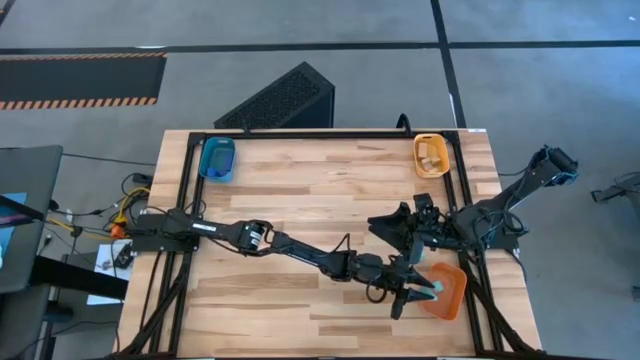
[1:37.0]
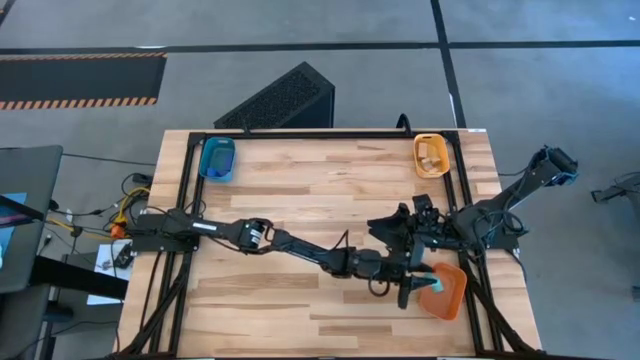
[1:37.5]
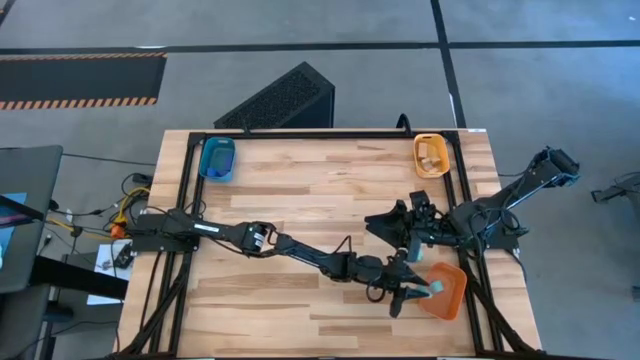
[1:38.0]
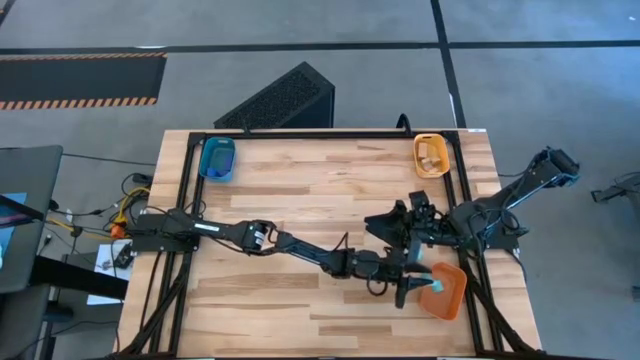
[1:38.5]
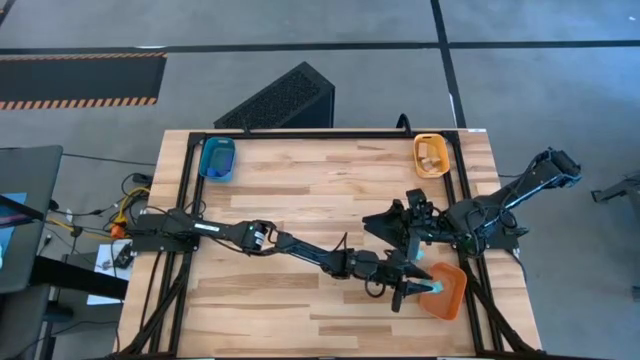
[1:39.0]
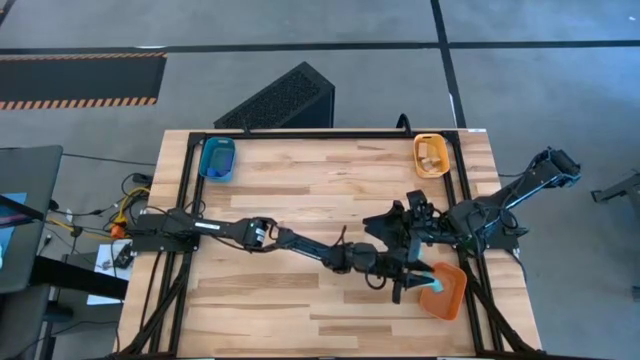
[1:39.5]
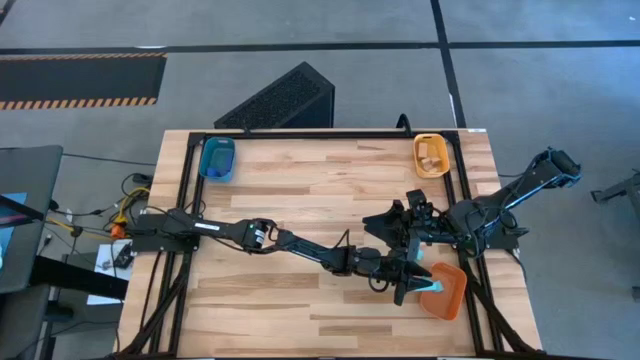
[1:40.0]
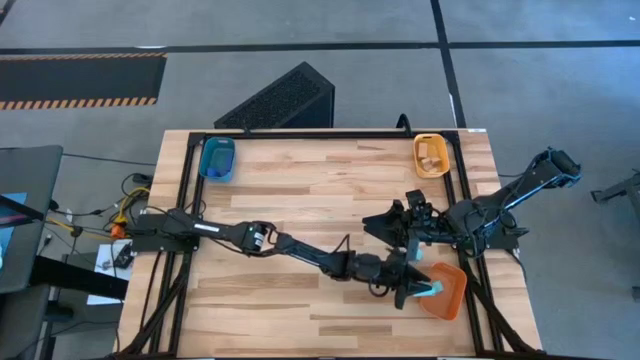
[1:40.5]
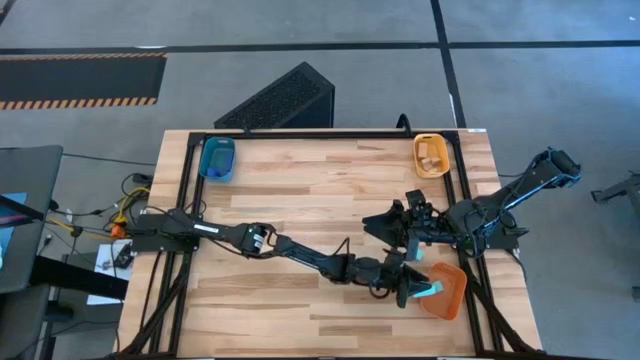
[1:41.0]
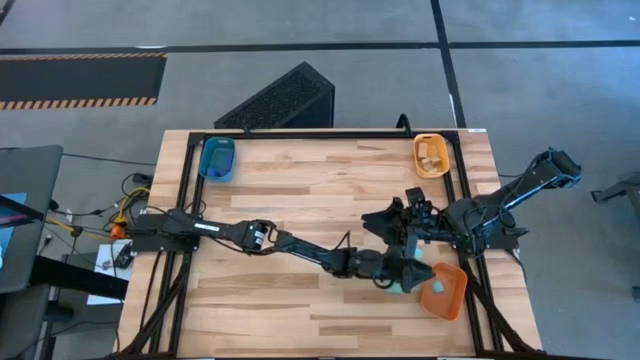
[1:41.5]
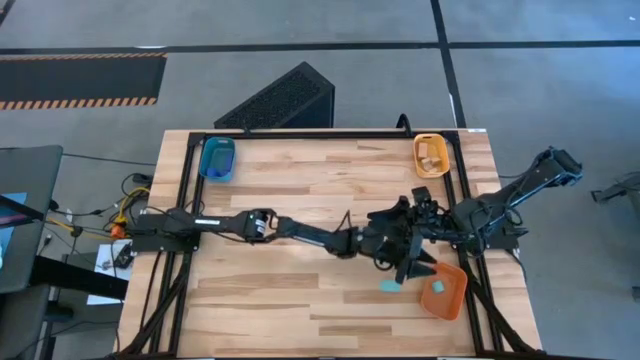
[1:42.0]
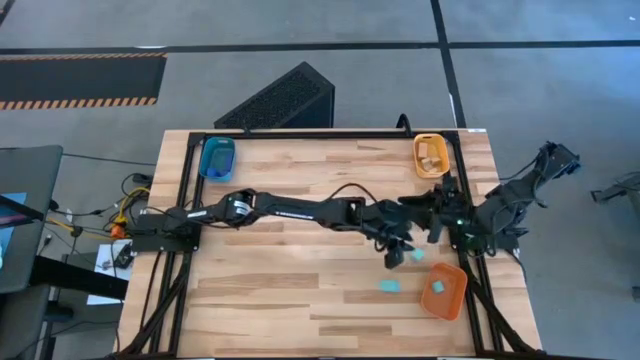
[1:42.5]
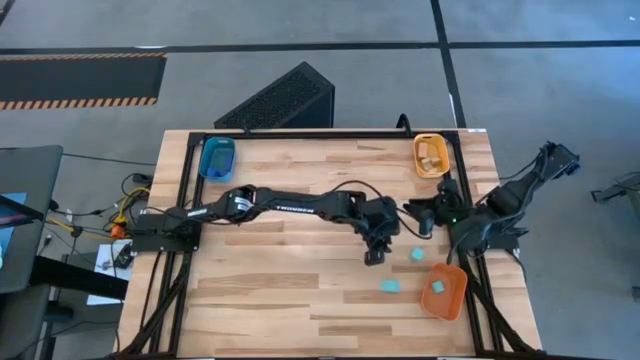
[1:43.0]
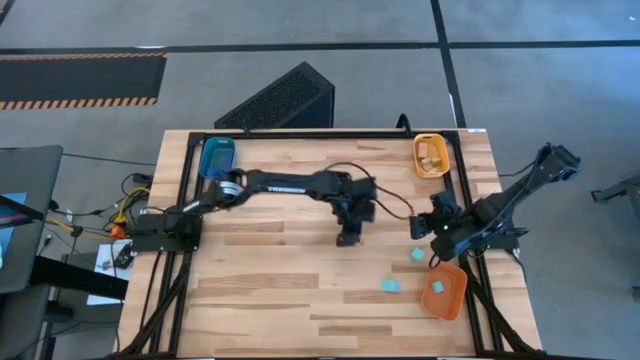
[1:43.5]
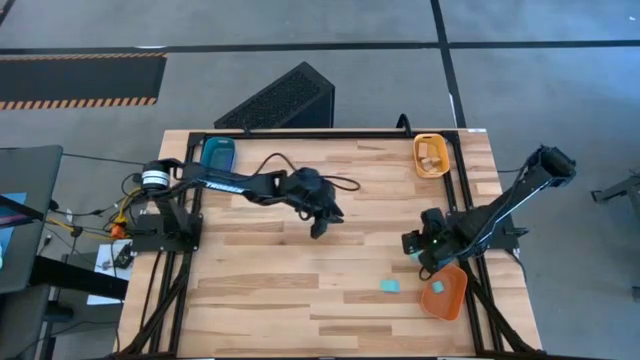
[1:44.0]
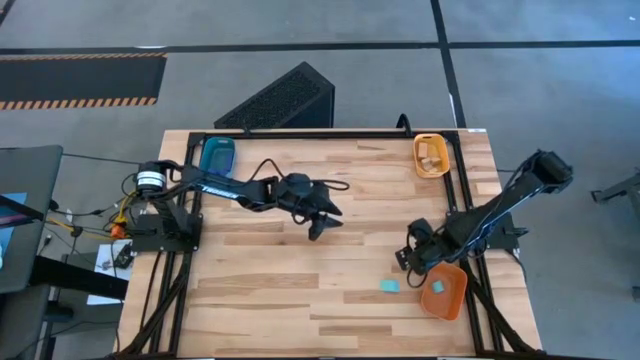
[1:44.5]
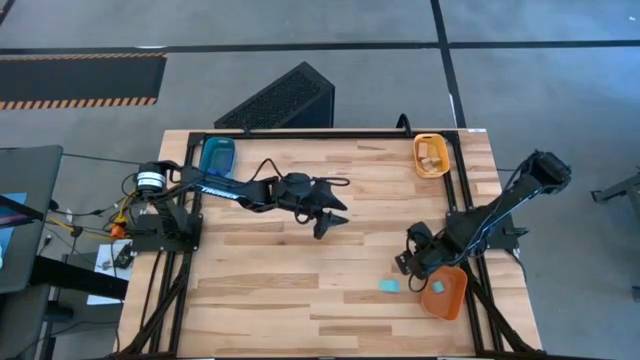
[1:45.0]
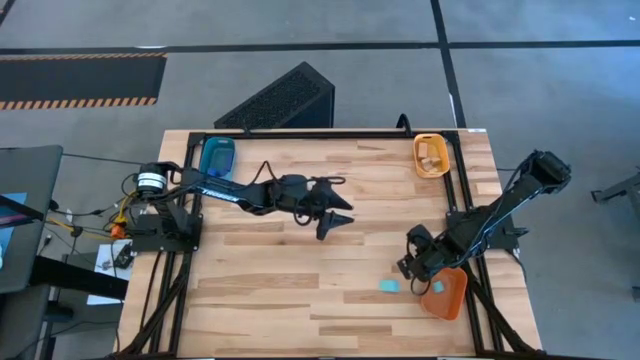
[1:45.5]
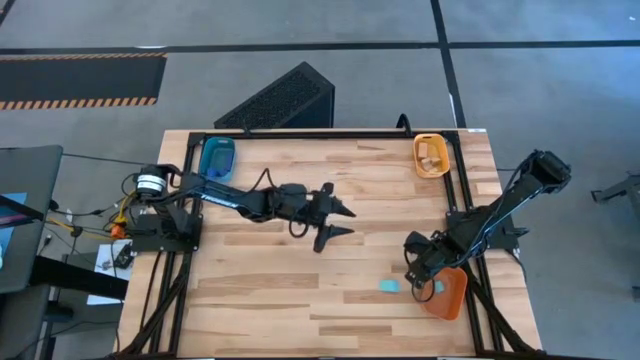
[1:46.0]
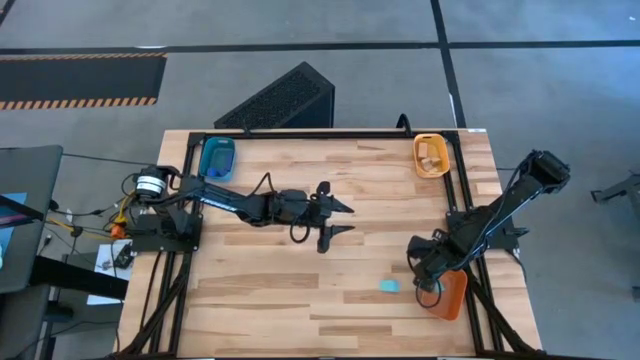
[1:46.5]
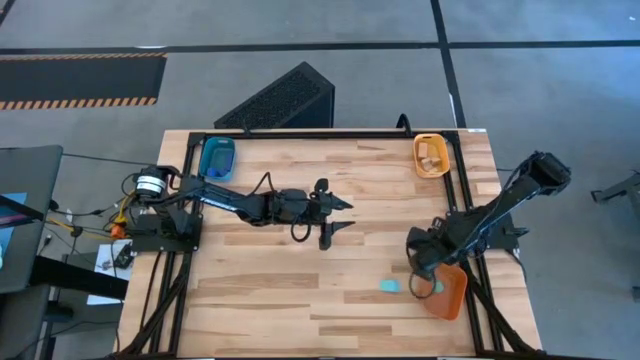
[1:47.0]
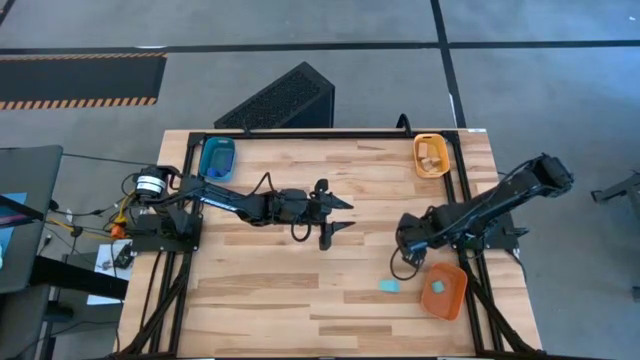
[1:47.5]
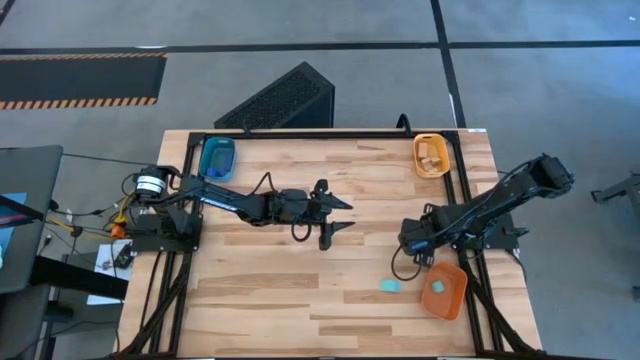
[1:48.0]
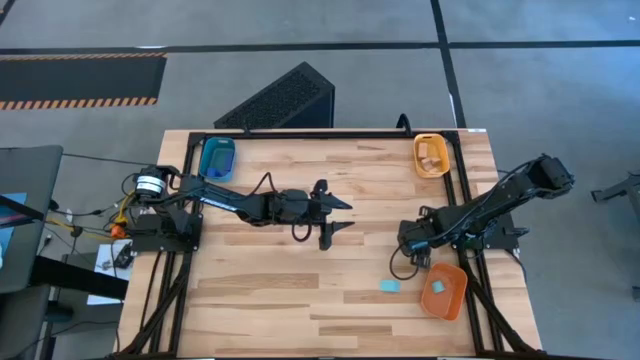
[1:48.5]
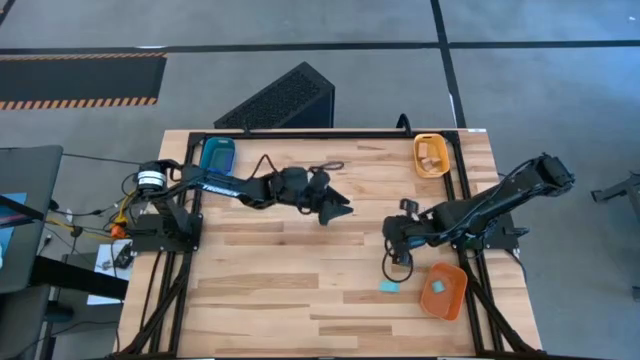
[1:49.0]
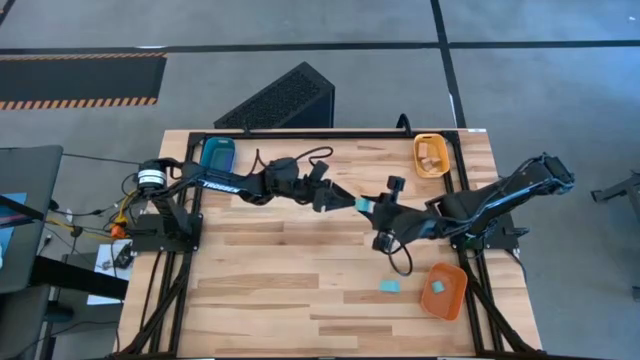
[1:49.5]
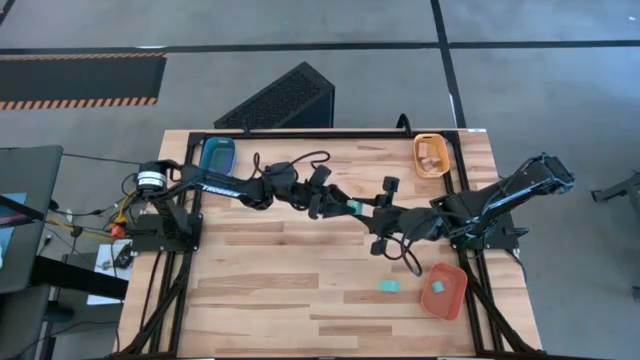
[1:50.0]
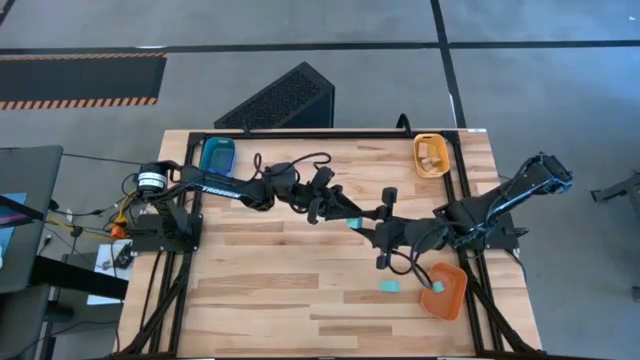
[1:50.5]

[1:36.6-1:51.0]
Task: Sort & place blocks by color
Put the top light blue block into the orange bin

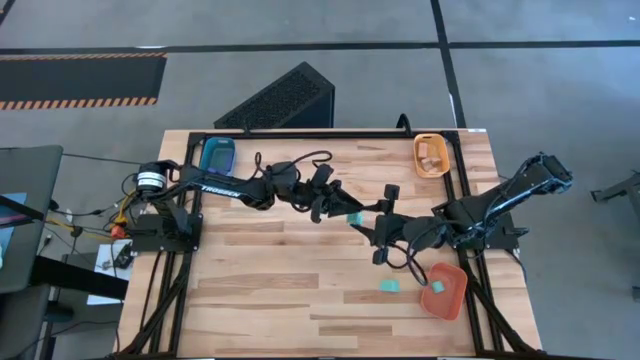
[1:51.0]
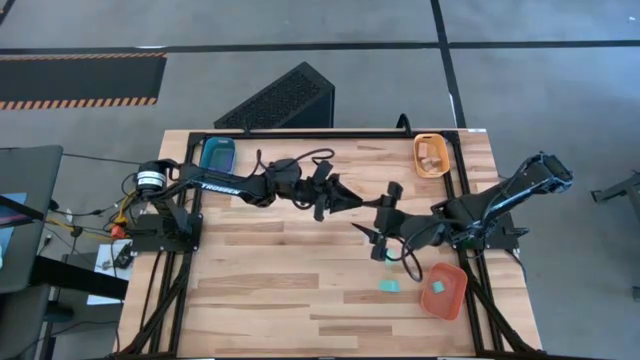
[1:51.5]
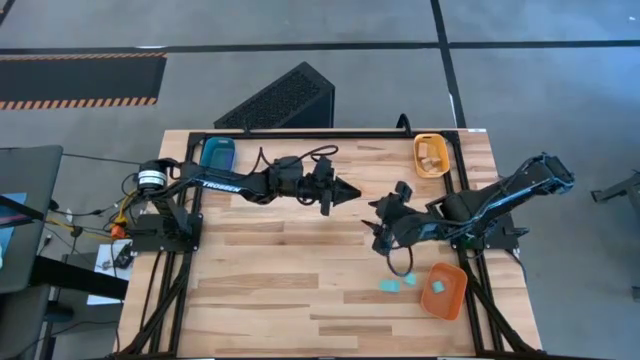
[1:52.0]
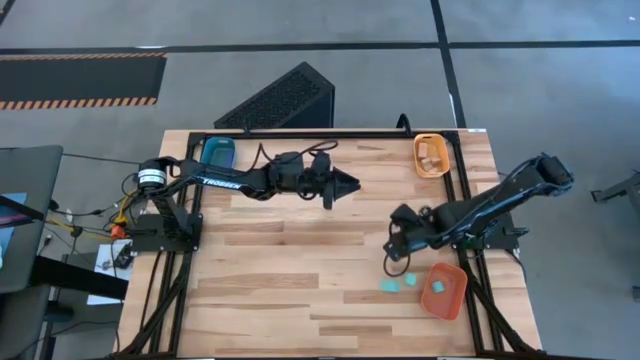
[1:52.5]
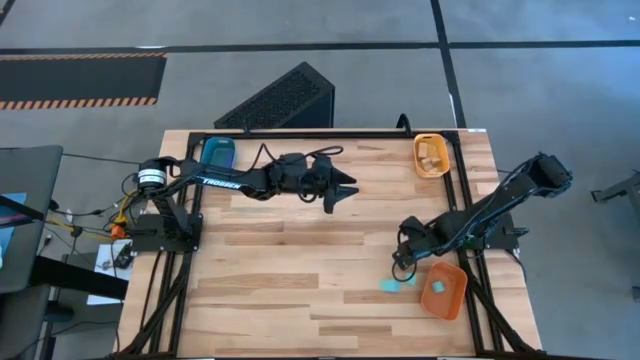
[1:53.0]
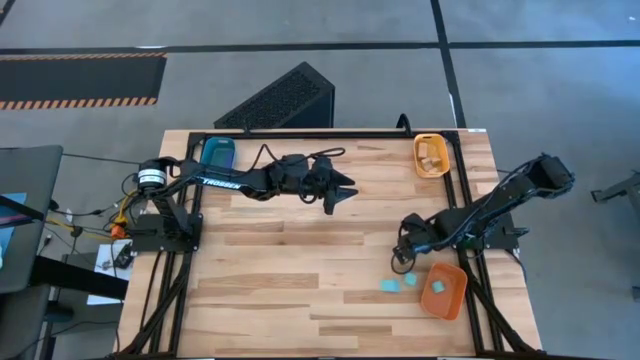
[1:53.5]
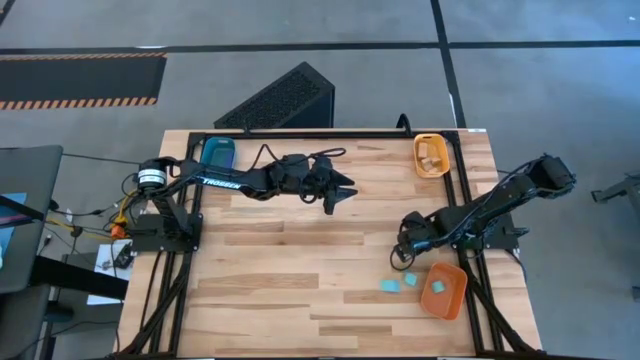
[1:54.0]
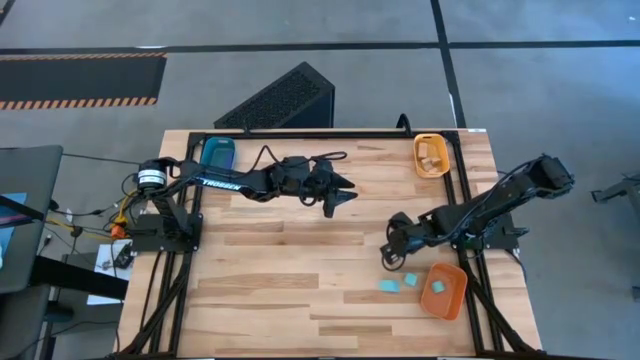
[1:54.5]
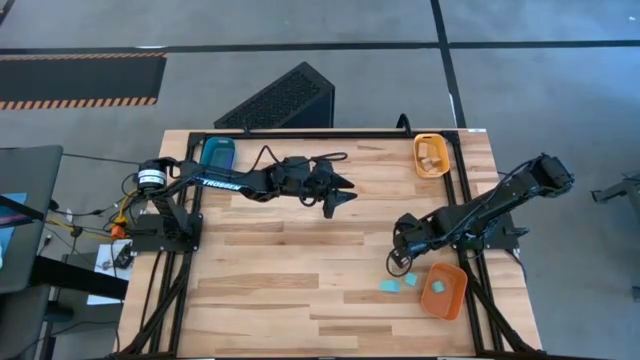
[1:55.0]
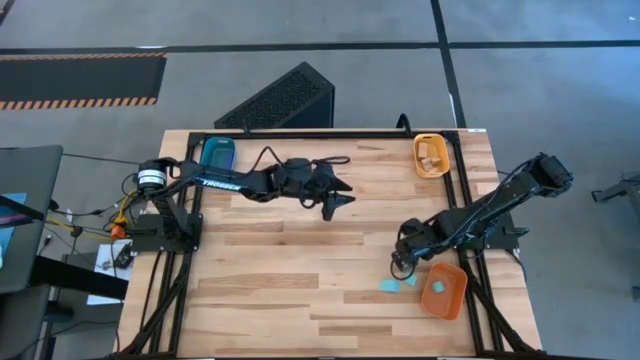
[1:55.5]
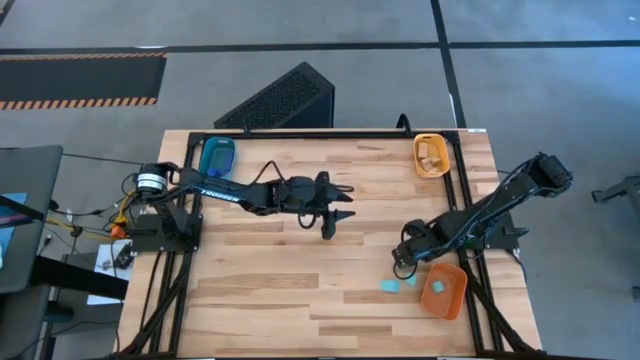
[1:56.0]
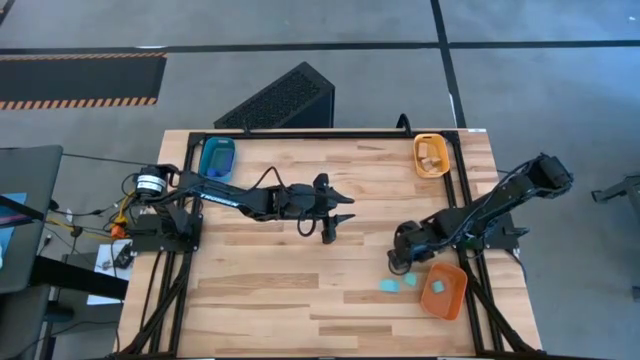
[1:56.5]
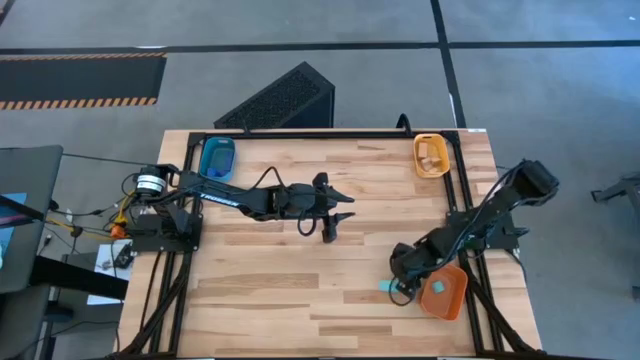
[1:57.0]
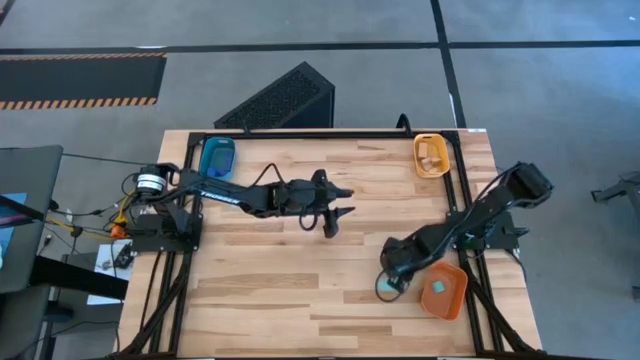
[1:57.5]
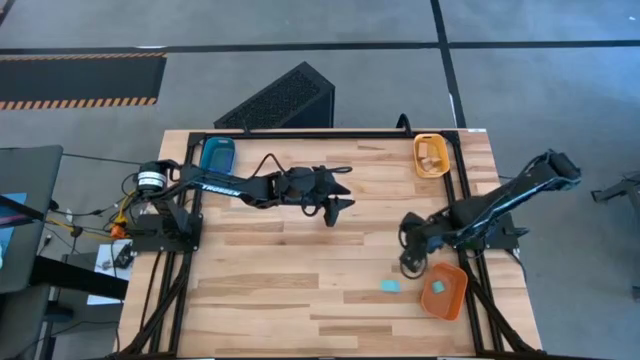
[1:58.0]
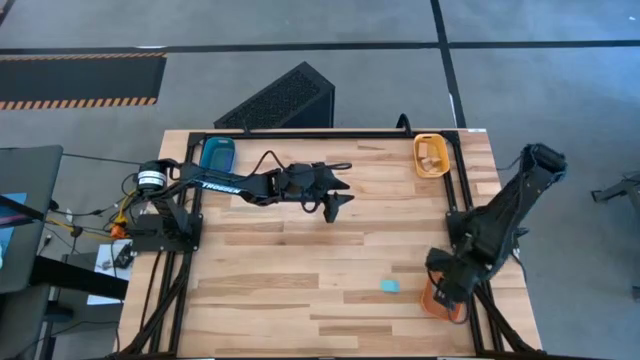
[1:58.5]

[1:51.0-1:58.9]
Put the top light blue block into the orange bin
